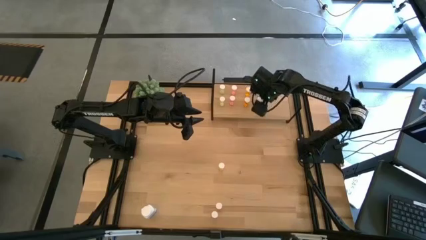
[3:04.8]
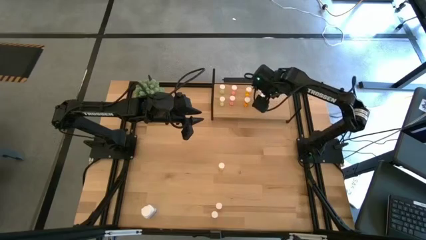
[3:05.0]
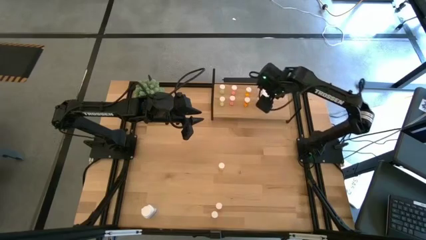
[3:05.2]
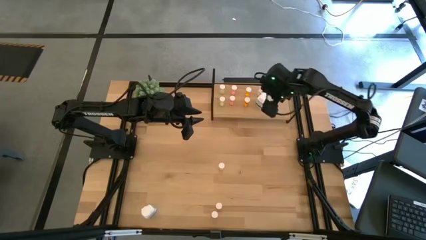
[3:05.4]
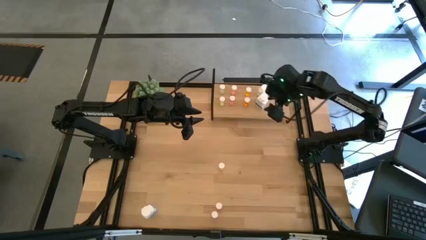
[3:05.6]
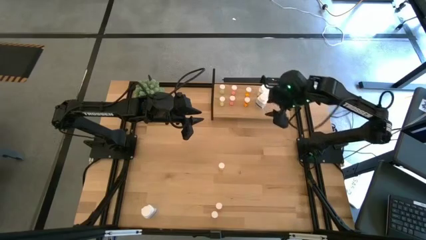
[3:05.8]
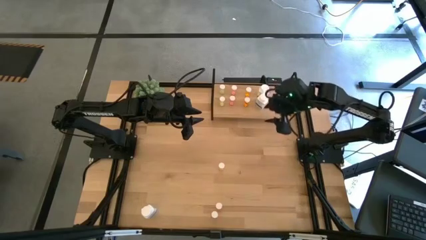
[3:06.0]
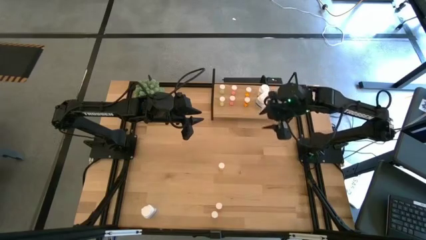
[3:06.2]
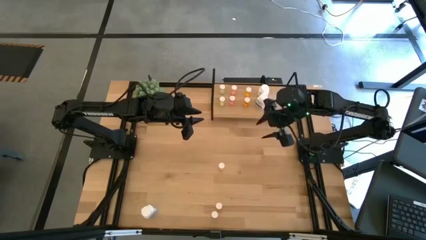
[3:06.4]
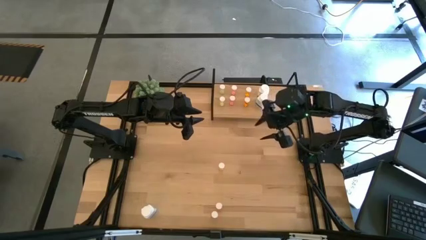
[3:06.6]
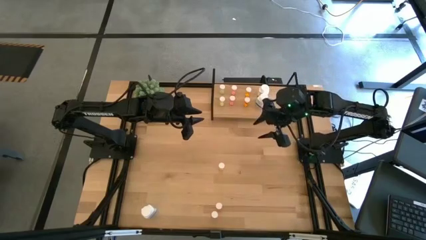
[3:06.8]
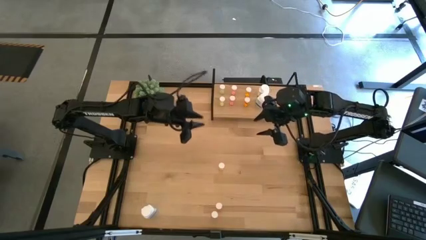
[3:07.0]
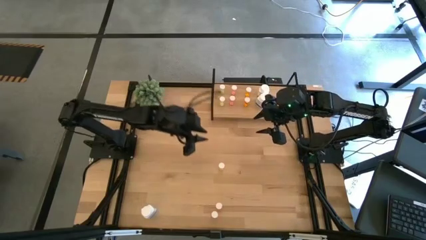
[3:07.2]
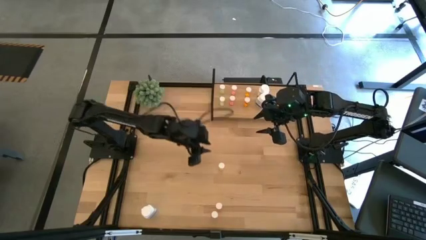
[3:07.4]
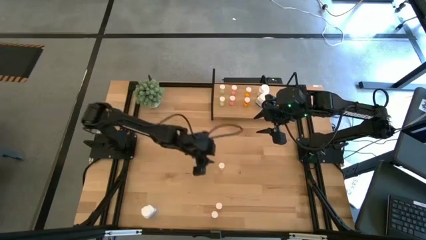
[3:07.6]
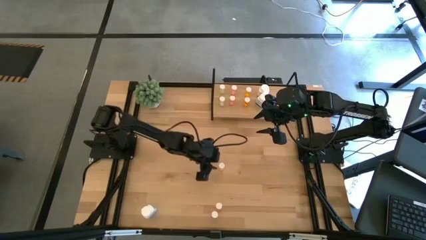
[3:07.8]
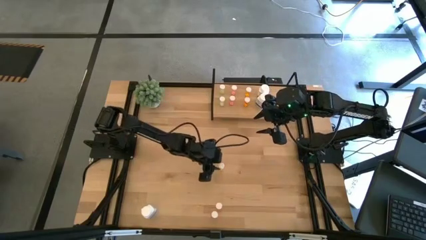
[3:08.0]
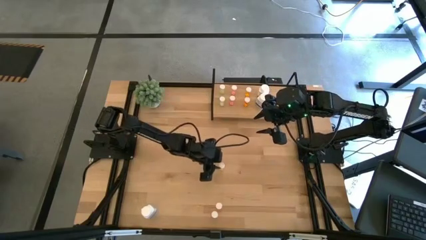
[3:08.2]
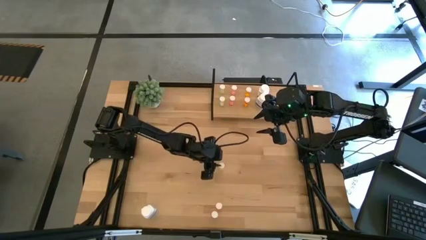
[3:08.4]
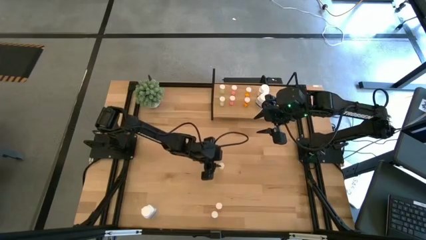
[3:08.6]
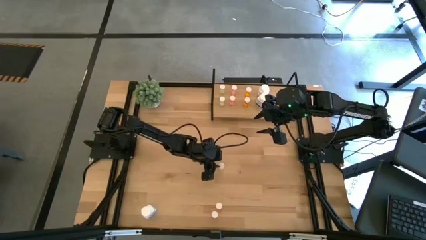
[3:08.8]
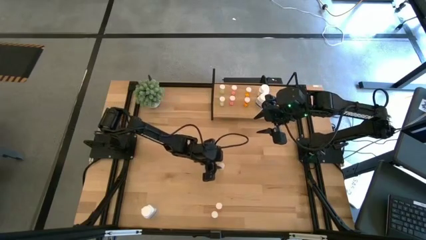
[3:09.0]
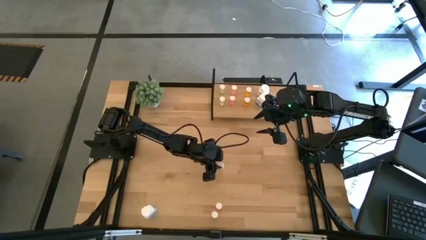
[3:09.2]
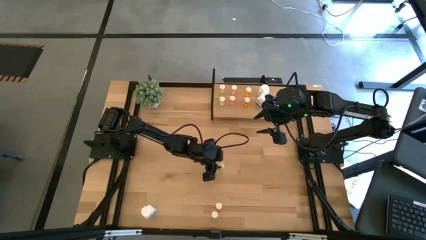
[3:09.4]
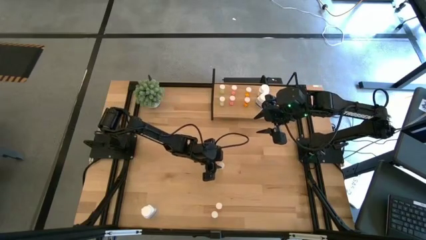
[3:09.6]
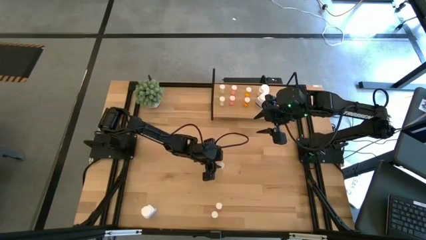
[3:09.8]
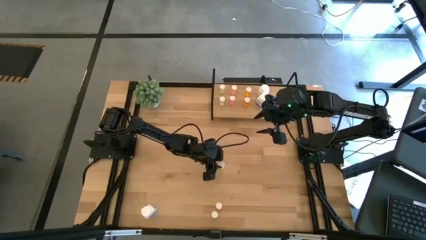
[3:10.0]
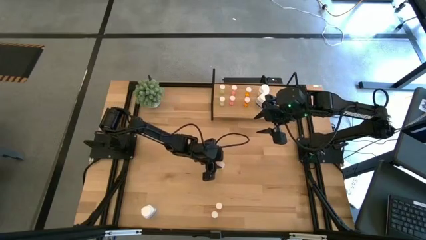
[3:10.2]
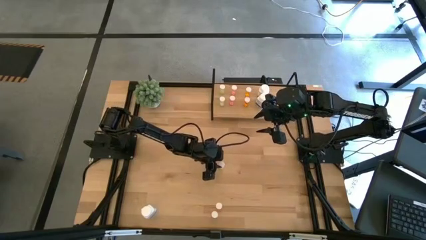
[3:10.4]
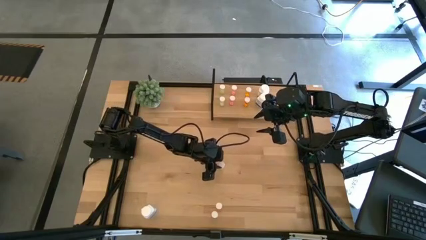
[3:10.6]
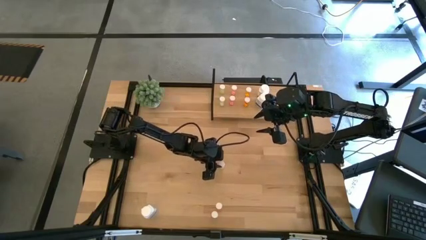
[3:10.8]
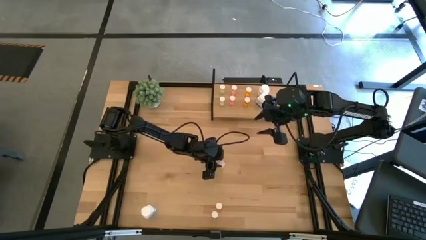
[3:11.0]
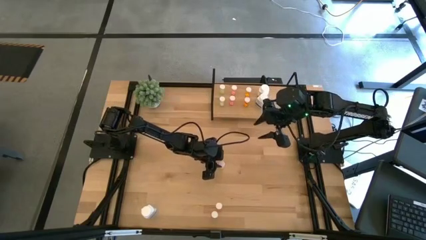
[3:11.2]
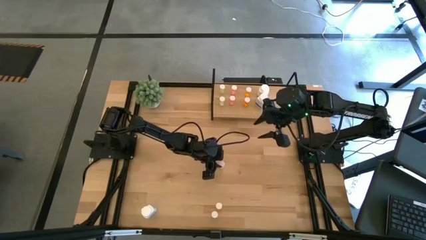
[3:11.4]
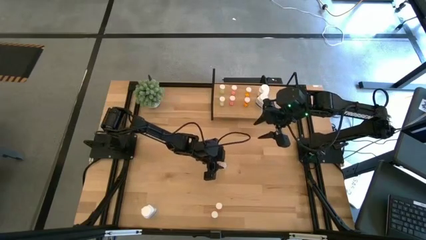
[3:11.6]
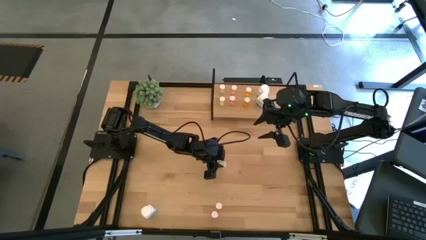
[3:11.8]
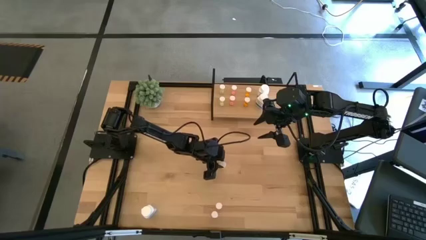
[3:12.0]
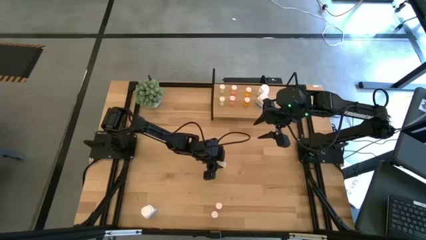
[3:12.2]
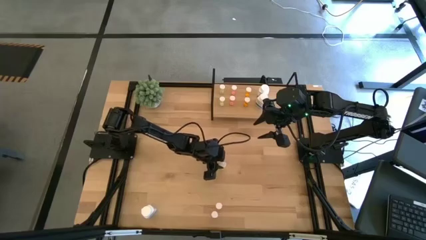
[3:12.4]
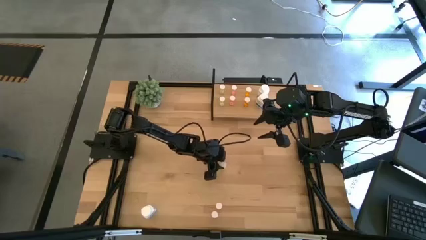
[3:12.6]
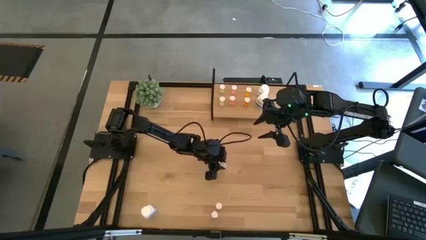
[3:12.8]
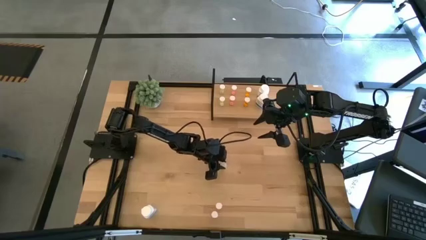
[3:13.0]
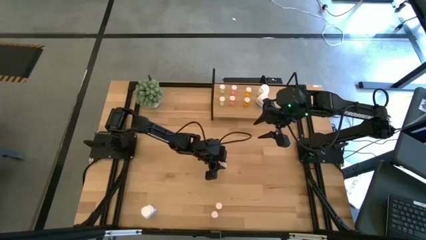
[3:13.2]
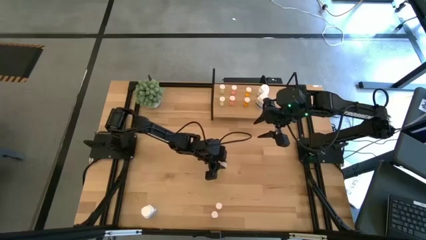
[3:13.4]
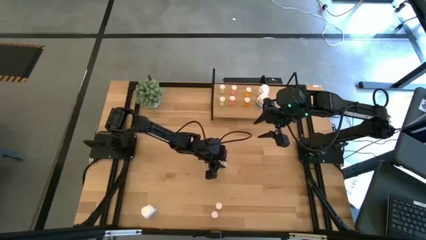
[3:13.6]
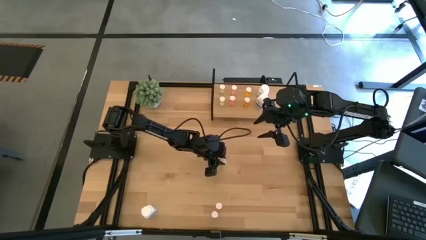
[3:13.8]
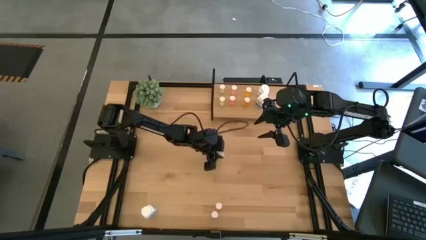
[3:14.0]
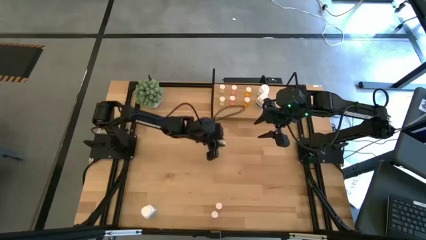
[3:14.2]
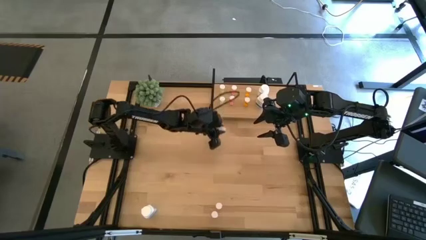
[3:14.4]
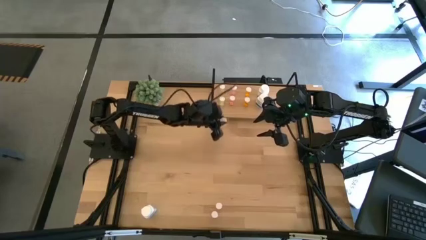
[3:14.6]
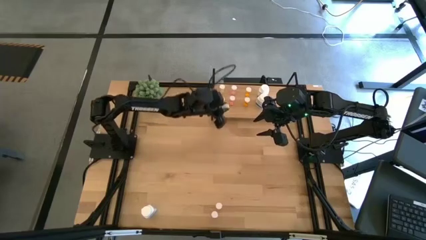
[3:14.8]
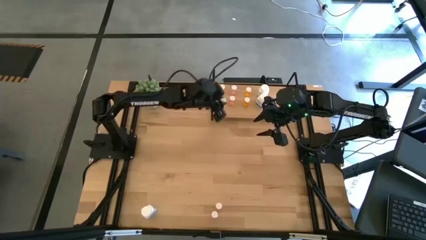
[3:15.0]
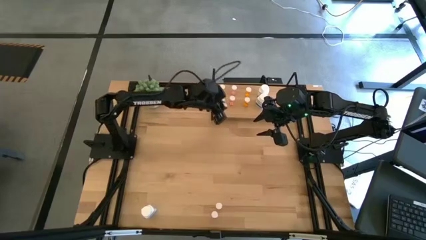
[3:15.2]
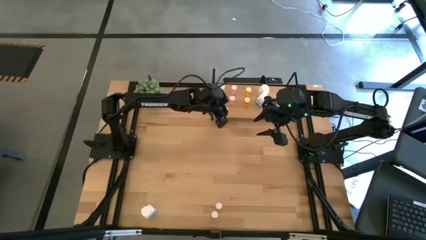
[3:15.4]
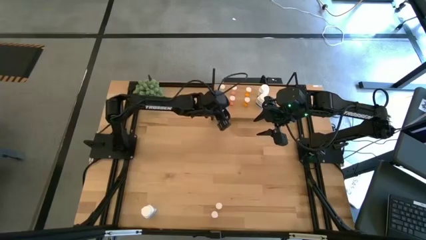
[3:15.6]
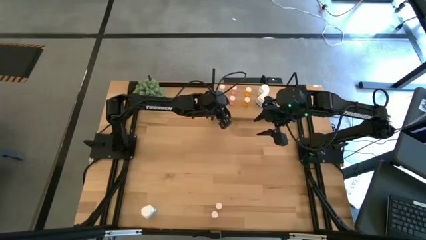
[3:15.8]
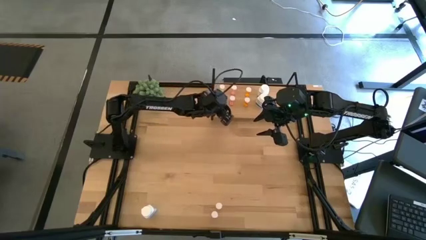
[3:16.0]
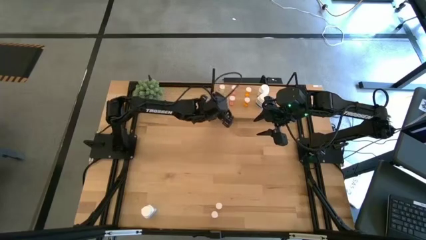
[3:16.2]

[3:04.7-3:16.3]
Task: Pick and place medicine bottles onto shelf by color
Put the yellow pill bottle on the shelf aligned with the other yellow pill bottles

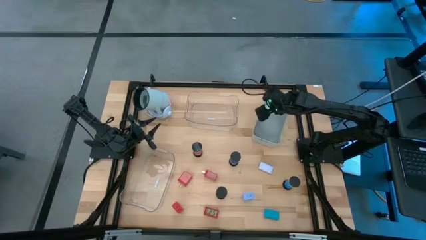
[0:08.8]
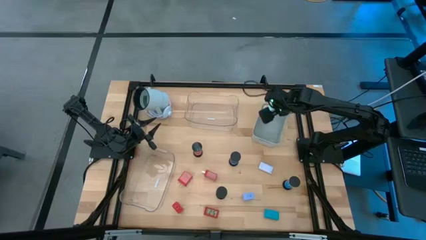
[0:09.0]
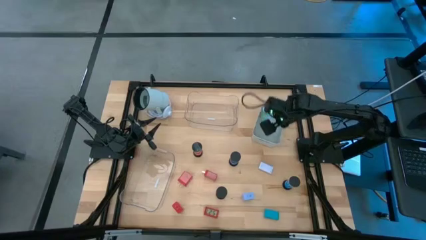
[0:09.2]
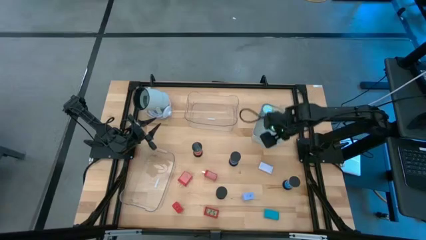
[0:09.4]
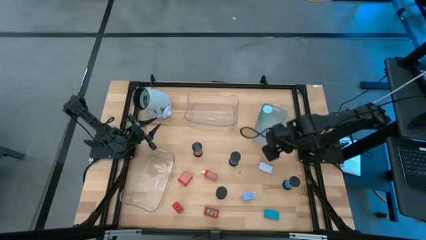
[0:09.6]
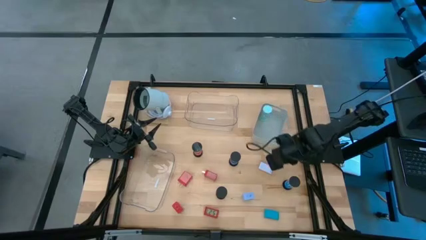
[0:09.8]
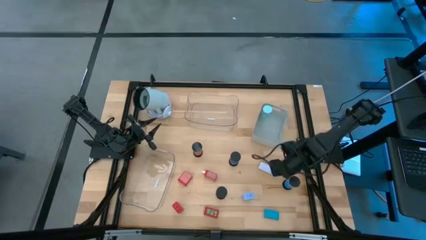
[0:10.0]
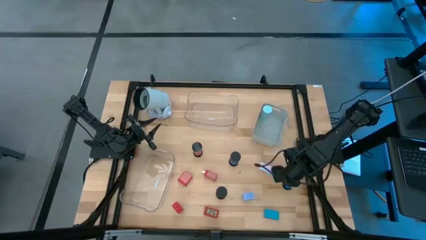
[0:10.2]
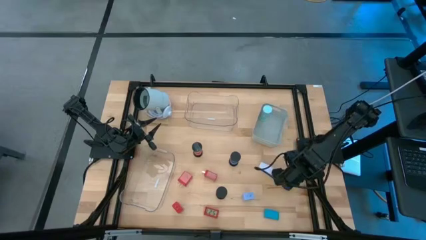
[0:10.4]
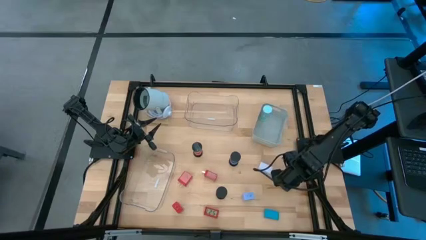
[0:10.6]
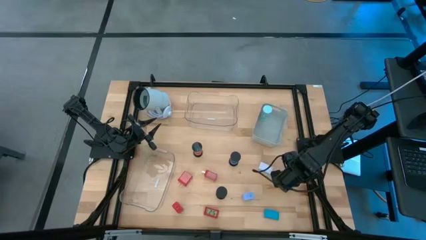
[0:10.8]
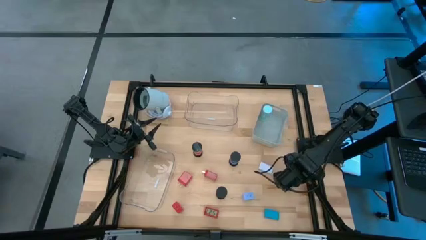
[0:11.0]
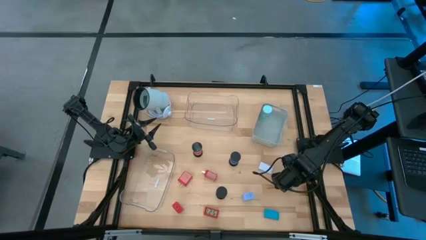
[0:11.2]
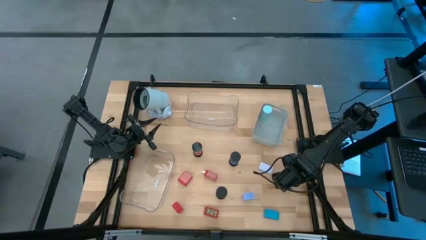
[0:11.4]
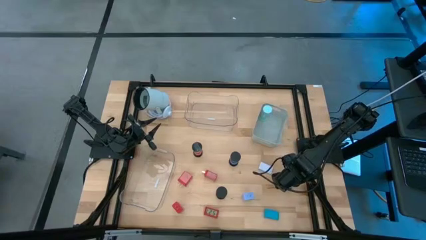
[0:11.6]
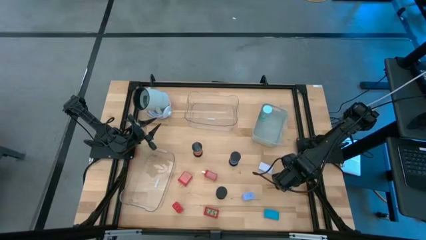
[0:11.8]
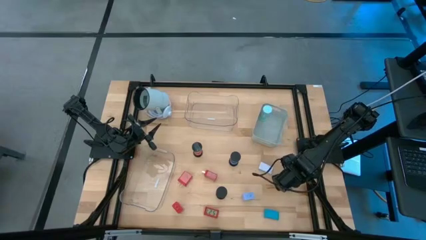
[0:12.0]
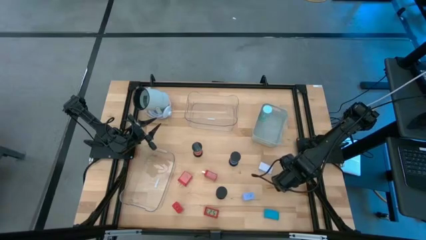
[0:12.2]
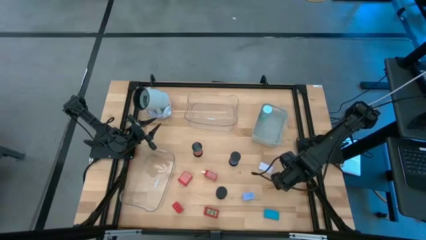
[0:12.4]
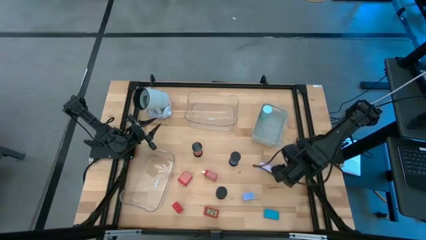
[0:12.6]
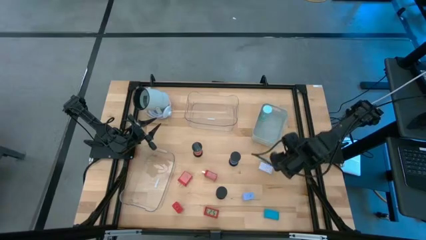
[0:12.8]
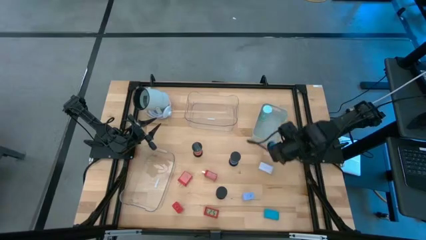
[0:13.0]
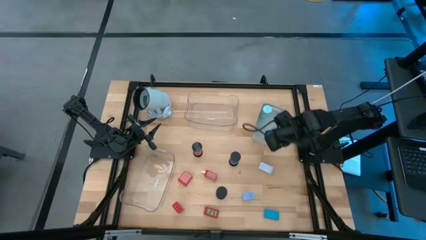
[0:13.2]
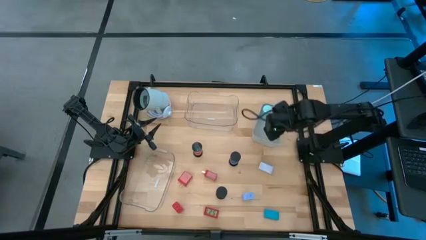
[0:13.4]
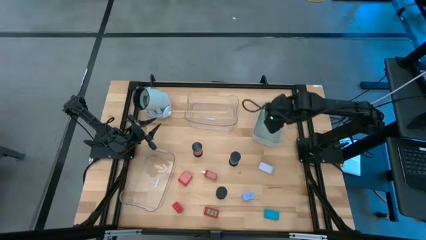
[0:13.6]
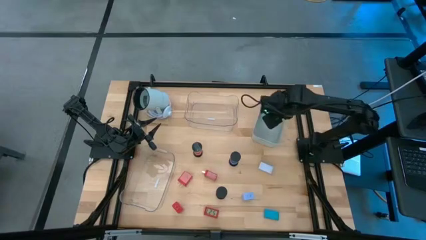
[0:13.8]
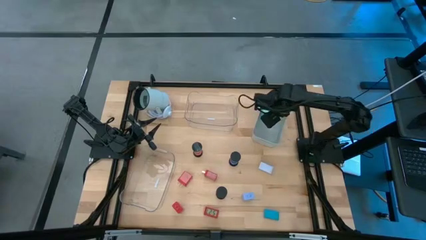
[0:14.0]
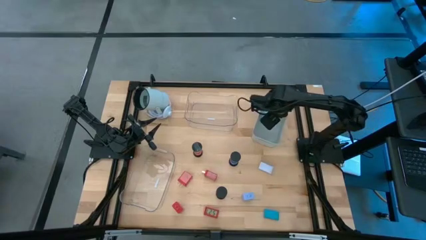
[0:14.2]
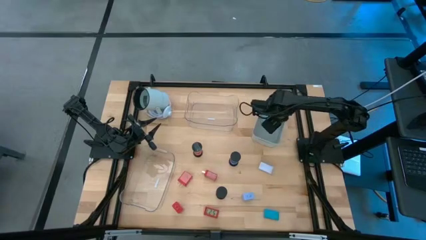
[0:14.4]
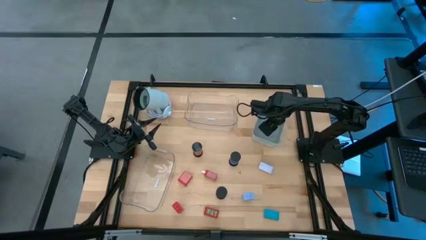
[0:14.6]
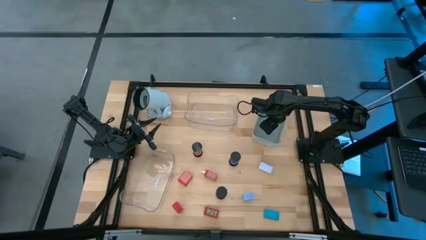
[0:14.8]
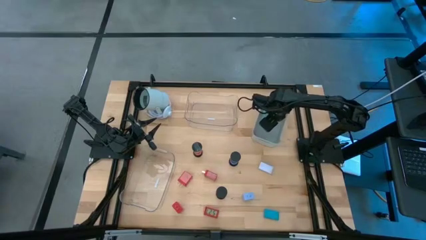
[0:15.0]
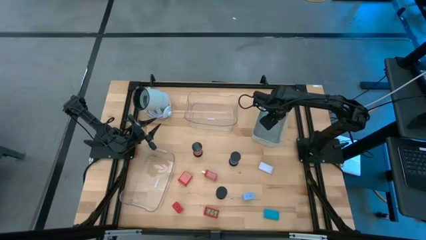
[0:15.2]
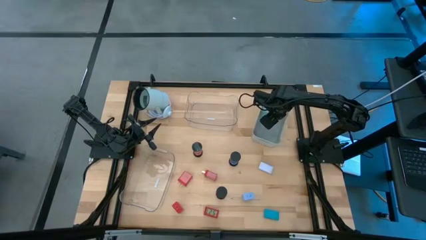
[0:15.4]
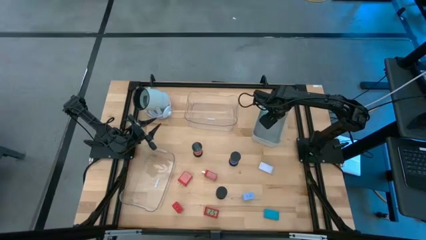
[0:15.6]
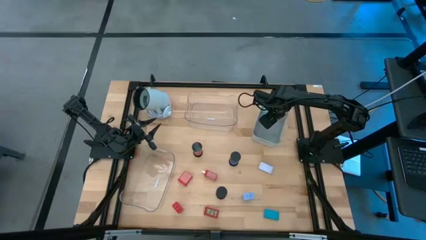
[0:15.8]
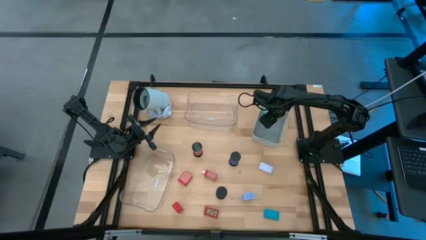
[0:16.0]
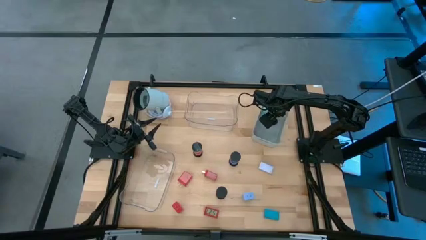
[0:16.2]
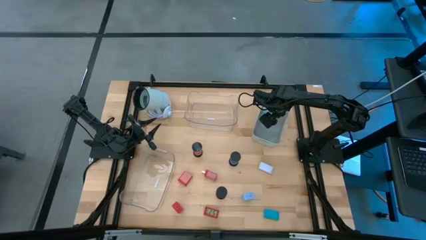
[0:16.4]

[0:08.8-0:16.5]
Task: Pick & Place Office items
Put the right blue hourglass into the grey bin
